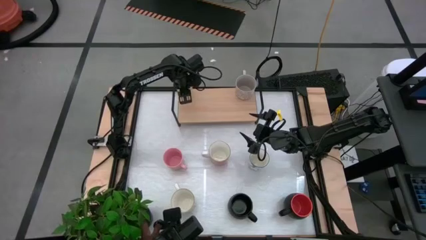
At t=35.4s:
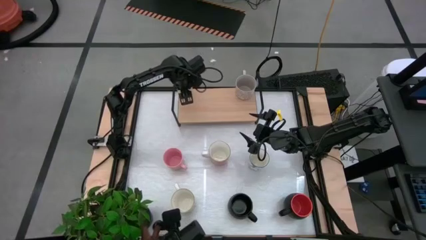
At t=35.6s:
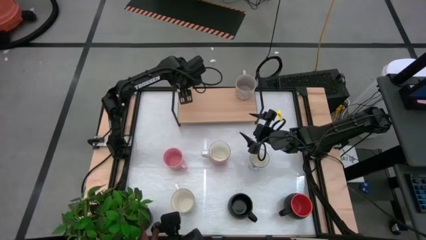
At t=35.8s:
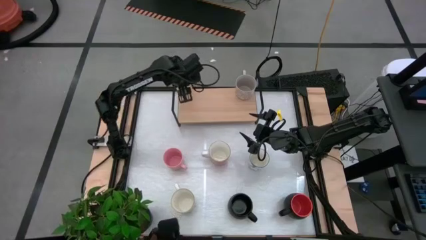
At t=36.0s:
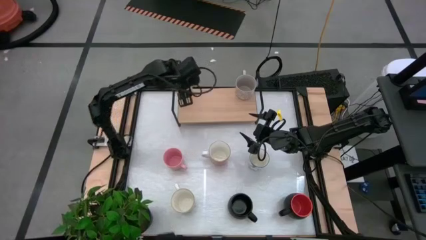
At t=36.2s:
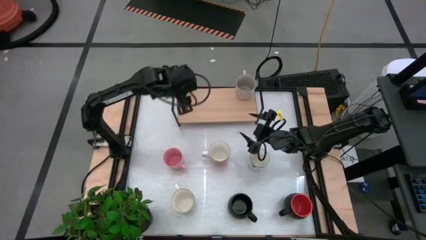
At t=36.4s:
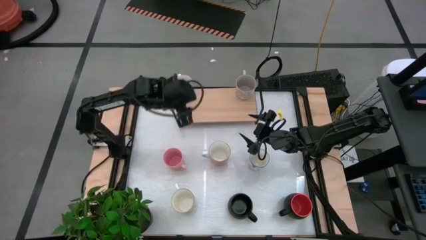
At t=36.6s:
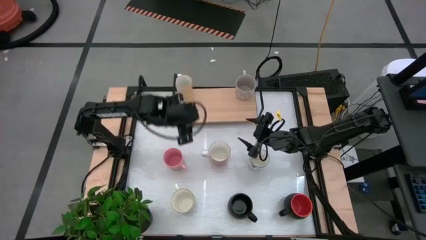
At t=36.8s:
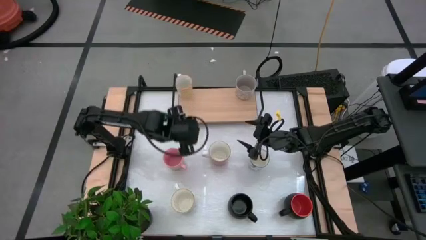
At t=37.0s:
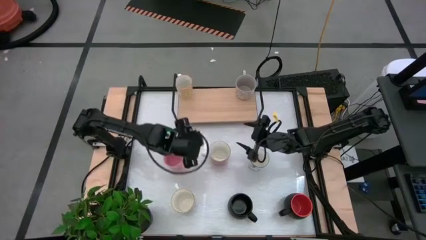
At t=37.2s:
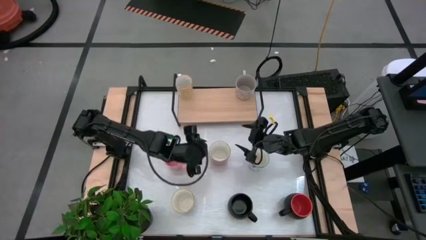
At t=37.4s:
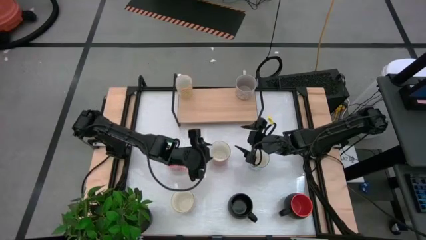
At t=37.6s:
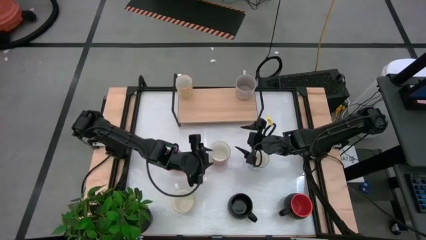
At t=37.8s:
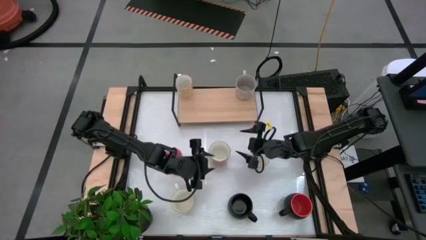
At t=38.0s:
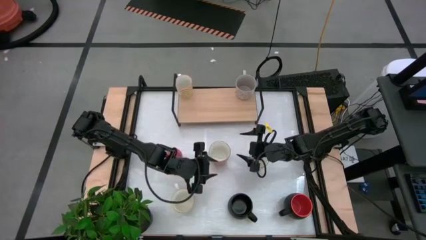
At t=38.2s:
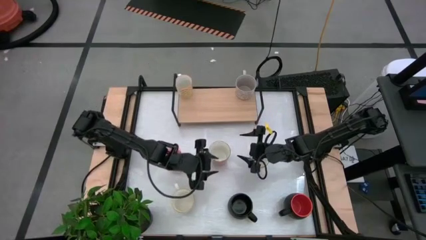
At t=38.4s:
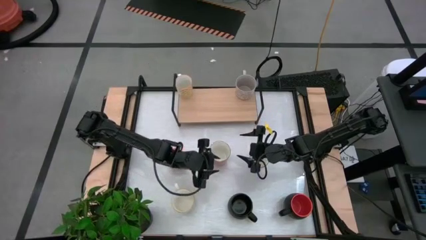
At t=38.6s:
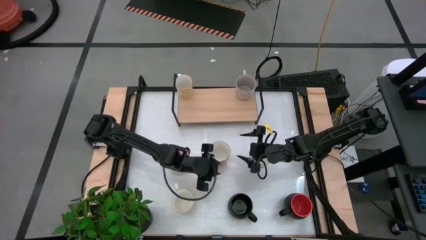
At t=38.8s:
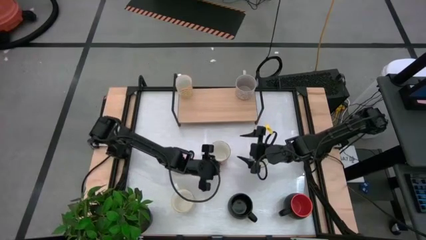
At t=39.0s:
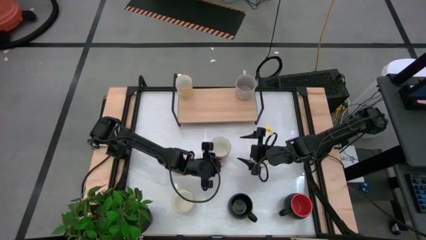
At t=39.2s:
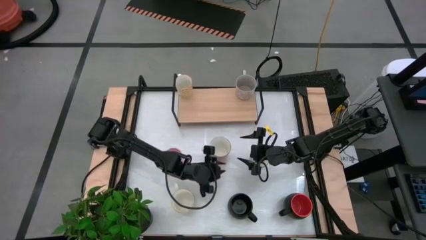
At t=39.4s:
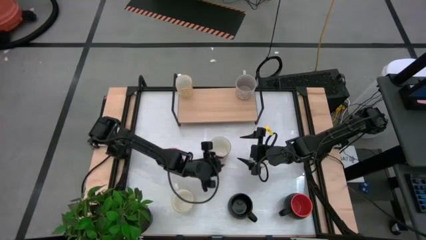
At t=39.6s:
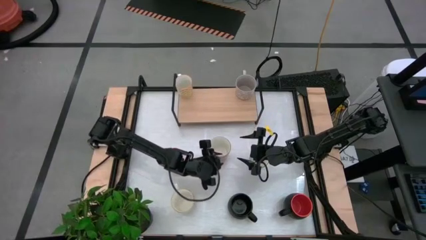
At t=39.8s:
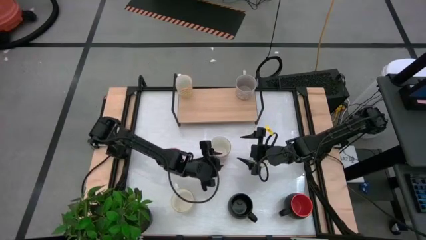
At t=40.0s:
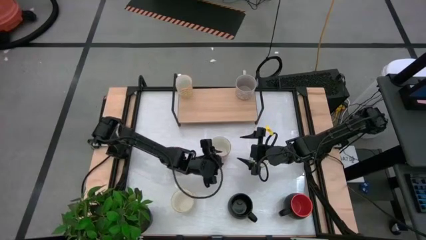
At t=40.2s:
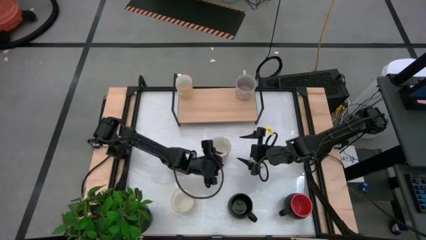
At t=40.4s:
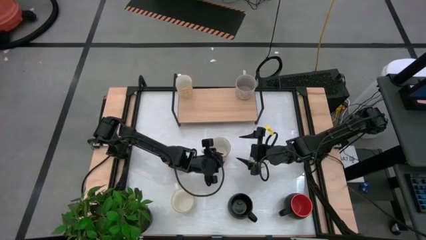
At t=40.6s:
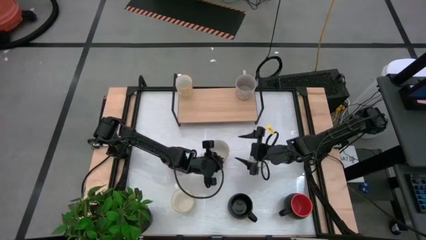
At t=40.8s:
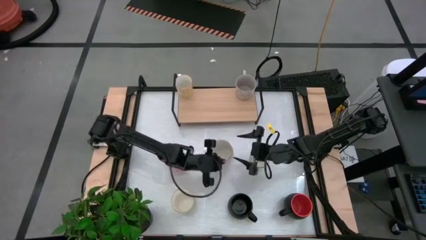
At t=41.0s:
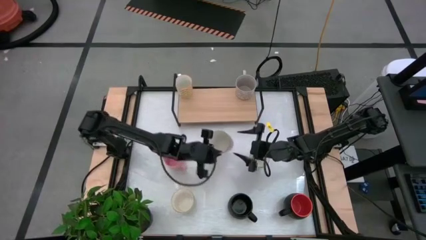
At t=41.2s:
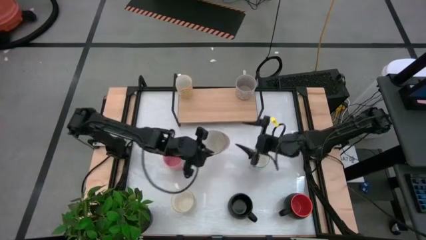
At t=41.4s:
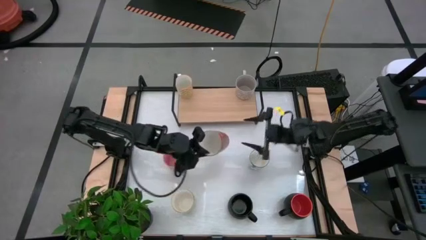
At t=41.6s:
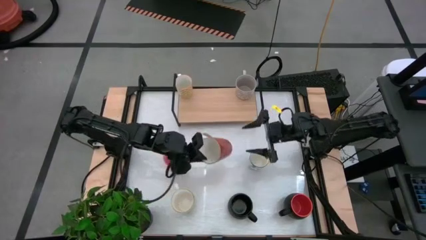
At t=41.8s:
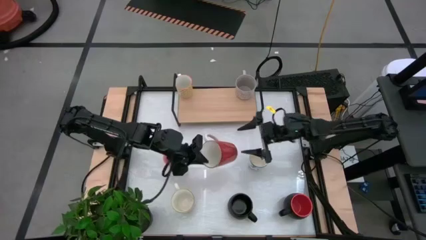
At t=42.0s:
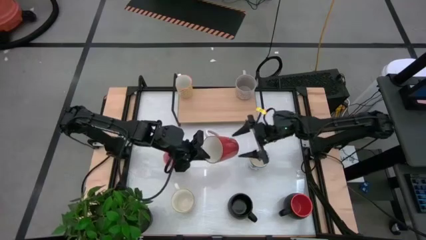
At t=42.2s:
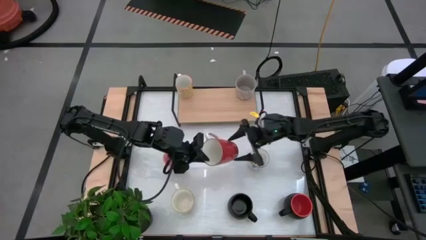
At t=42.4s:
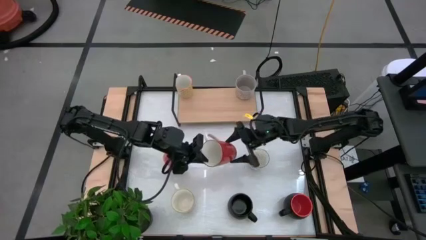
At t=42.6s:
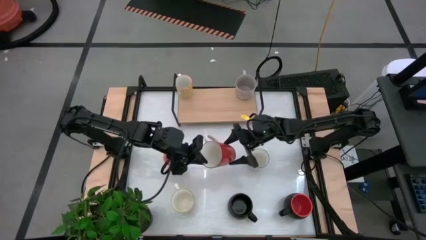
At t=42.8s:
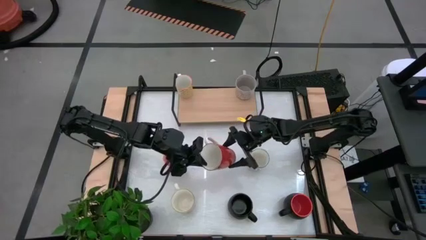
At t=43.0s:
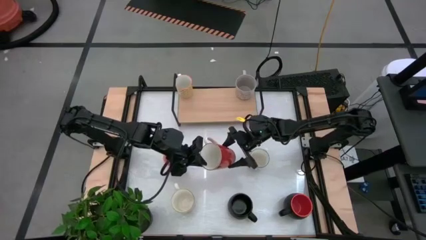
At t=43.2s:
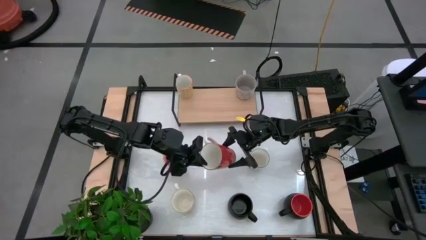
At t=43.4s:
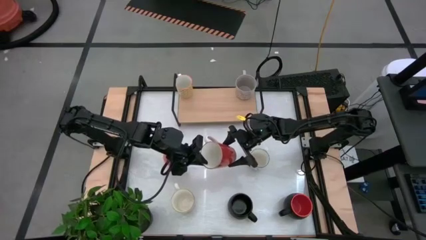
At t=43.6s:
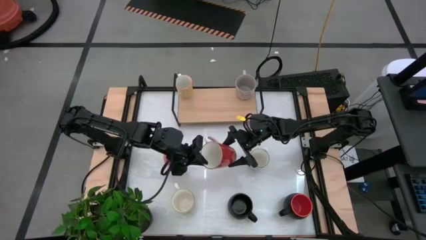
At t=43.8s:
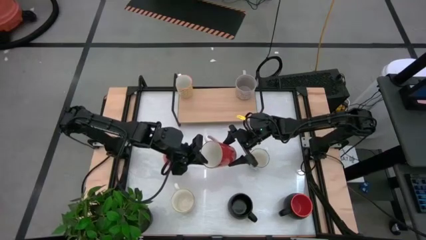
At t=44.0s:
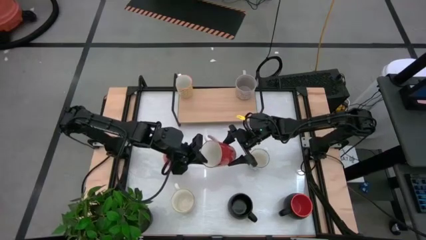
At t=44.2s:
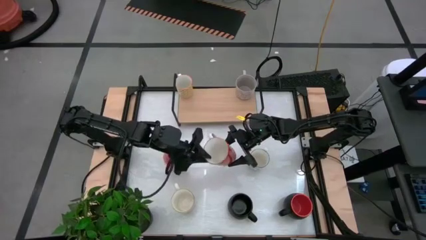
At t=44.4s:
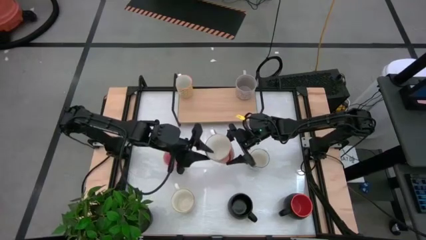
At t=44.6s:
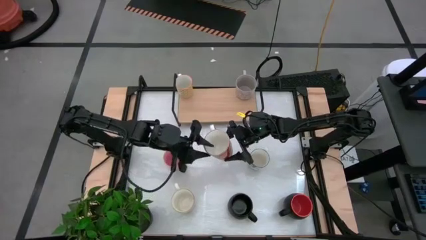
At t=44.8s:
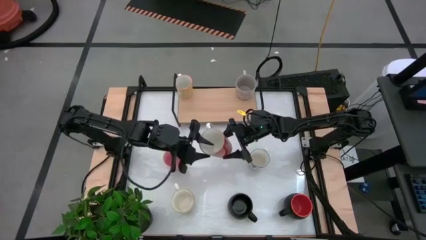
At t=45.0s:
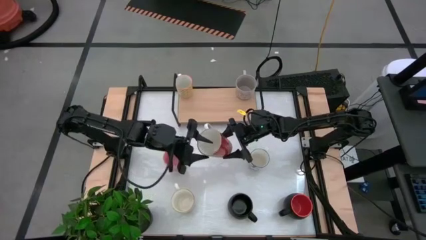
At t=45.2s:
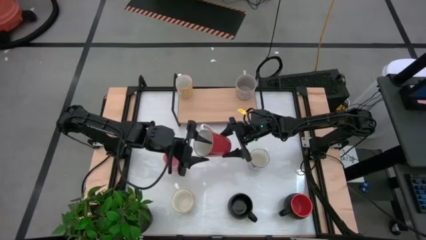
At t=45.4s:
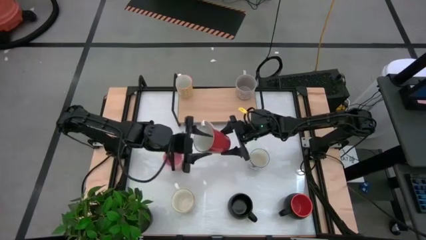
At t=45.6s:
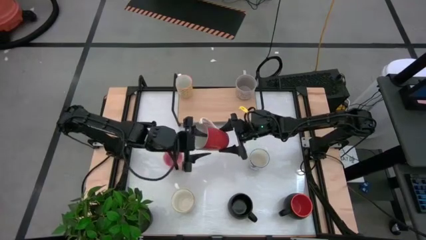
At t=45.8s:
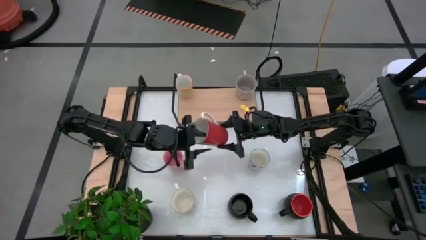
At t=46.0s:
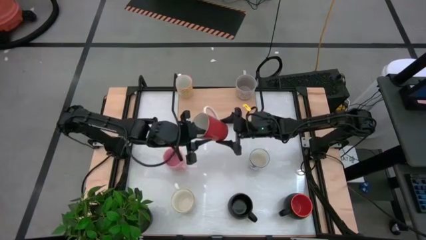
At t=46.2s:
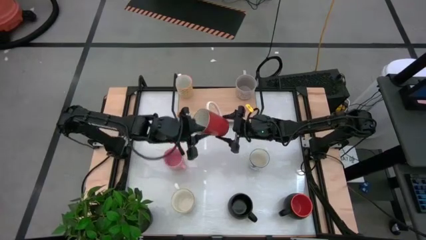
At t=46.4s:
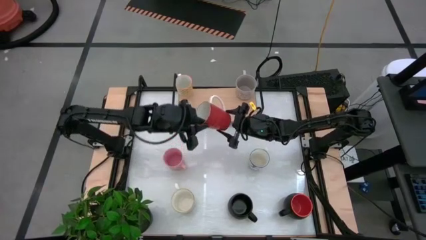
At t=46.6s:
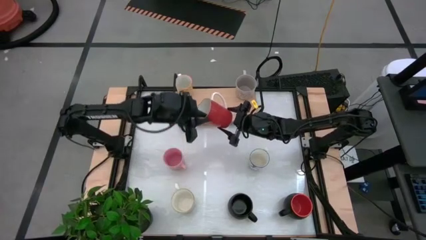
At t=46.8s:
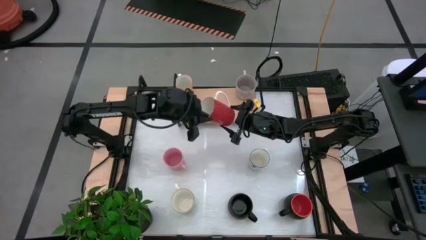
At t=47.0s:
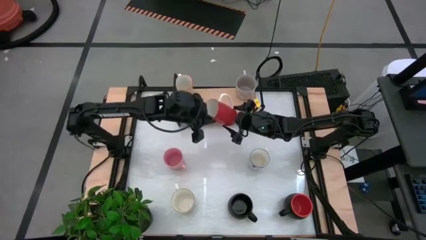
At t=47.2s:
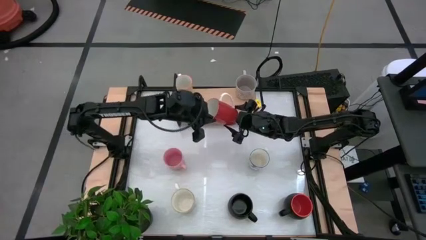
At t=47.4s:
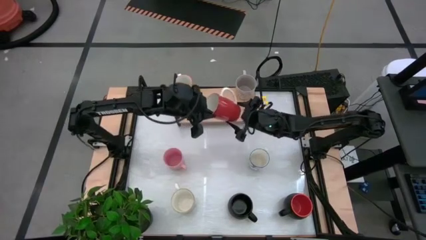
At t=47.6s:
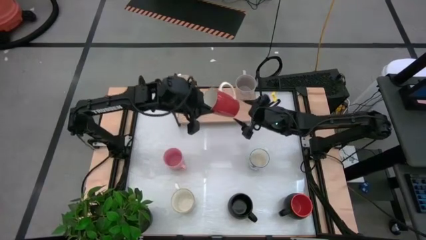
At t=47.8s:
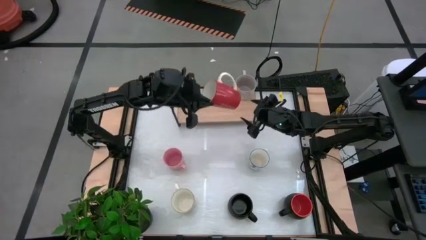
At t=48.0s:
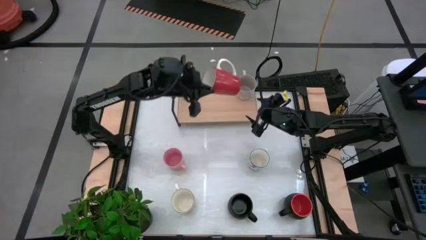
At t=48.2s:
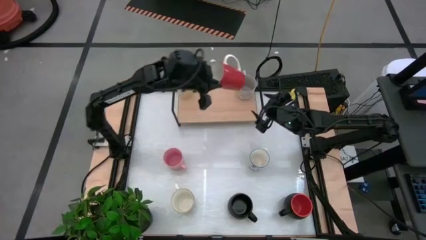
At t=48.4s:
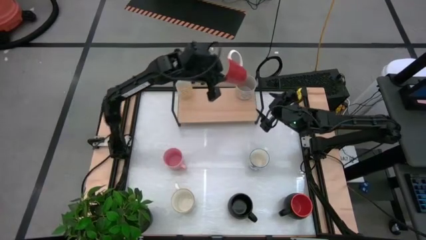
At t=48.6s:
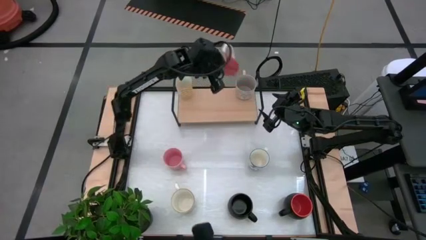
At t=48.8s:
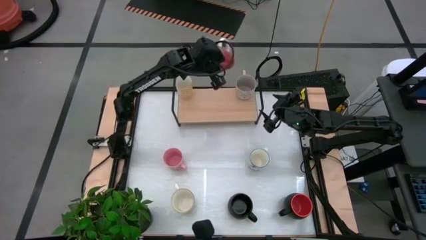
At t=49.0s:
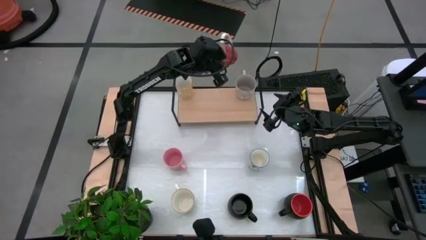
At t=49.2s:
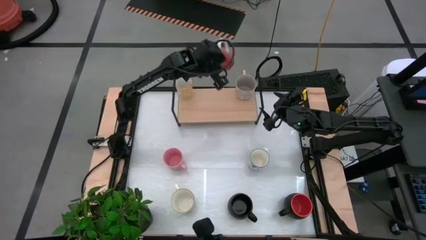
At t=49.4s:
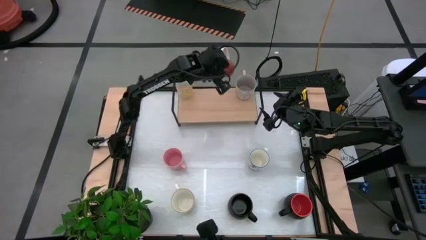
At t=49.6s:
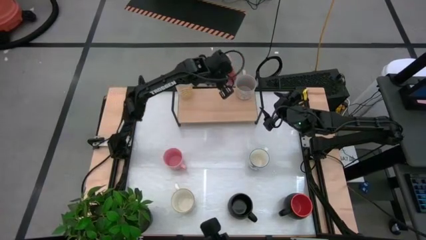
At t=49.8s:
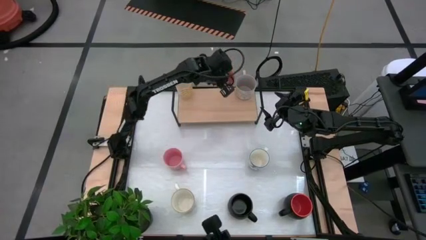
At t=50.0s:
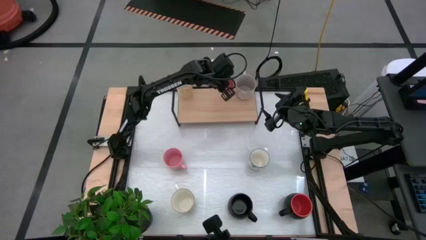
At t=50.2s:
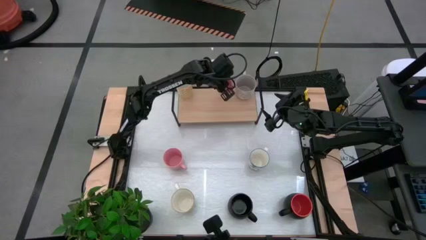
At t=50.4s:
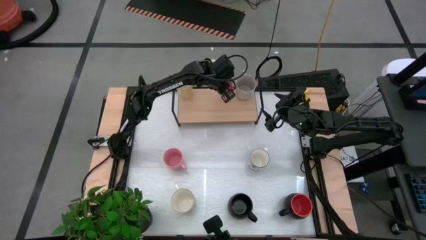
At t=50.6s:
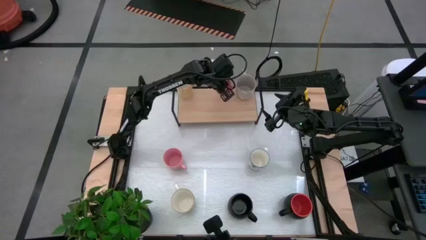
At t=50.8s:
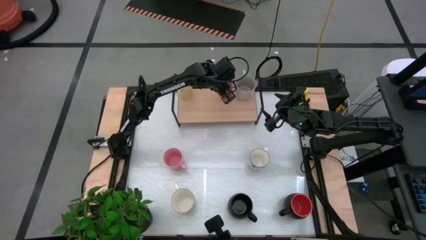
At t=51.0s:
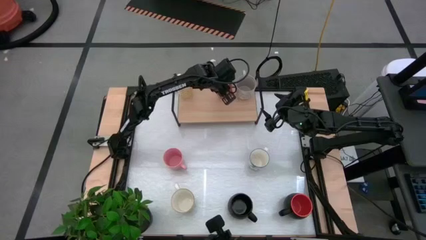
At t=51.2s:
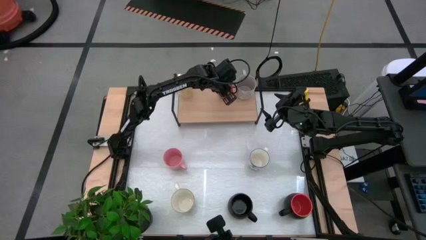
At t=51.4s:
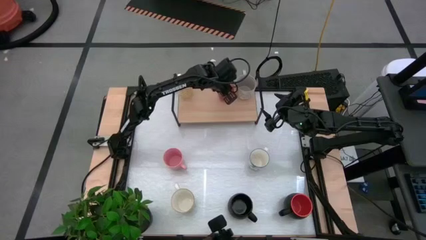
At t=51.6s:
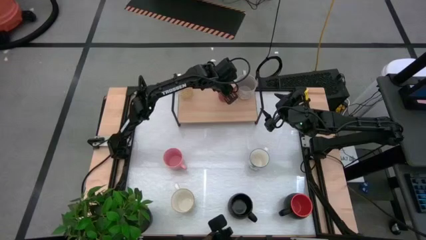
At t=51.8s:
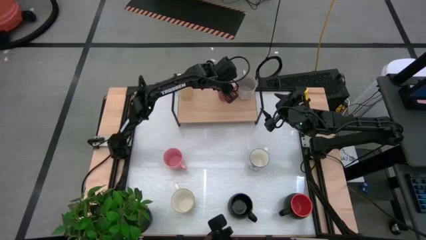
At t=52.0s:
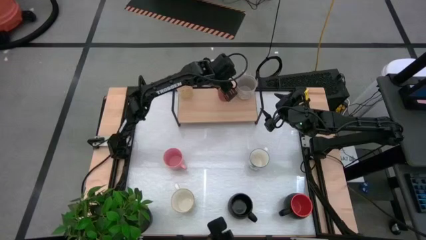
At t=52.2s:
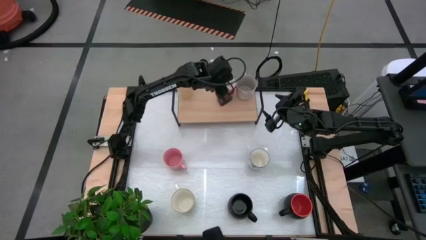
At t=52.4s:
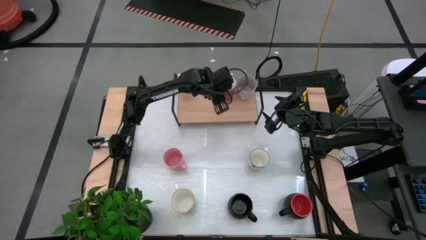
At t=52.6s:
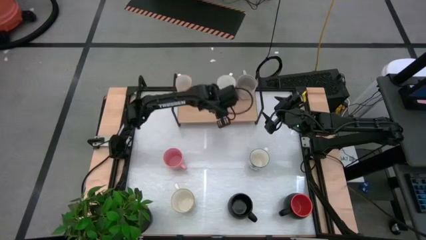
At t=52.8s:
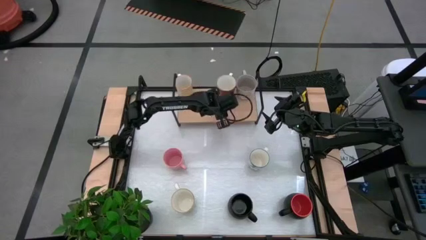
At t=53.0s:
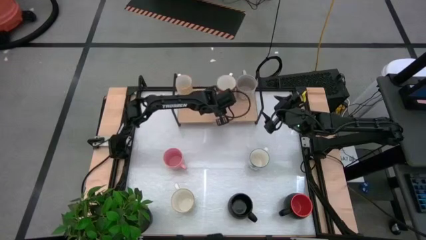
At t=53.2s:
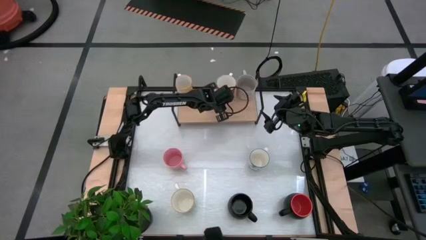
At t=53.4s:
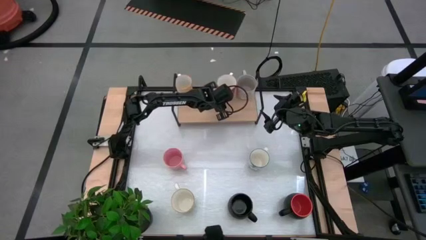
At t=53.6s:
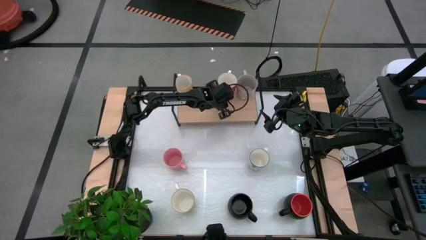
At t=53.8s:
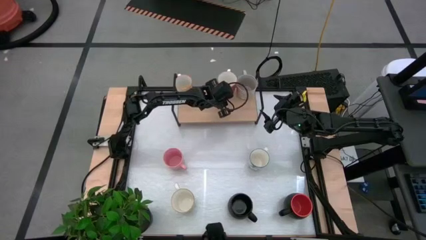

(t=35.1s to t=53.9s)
Task: Place coffee mugs
Put the brown mug on the shelf
